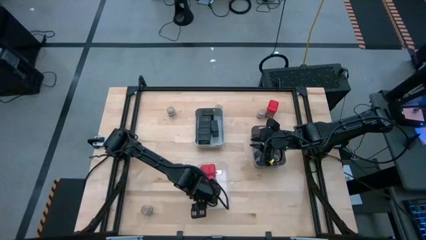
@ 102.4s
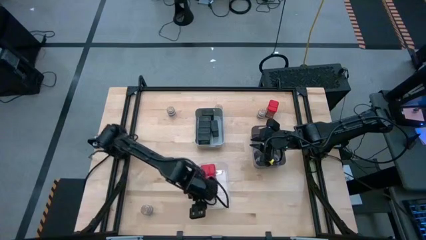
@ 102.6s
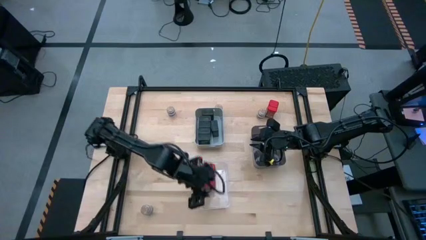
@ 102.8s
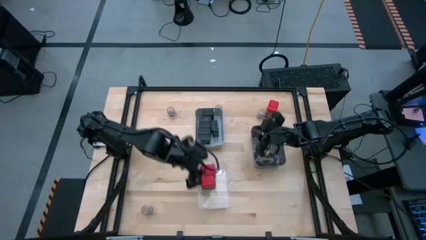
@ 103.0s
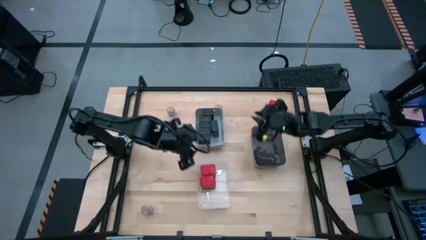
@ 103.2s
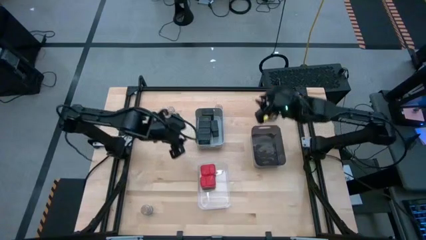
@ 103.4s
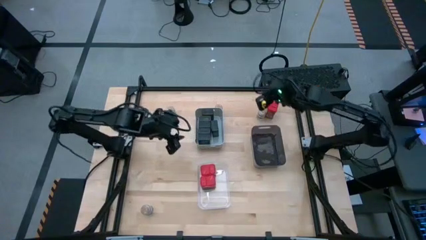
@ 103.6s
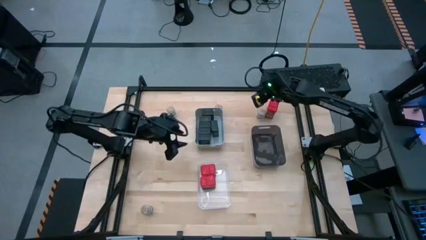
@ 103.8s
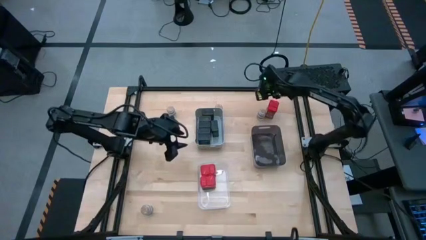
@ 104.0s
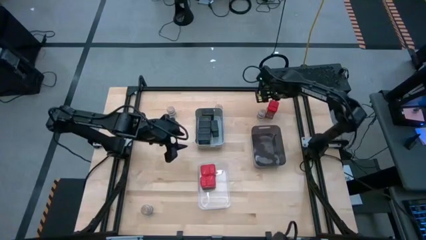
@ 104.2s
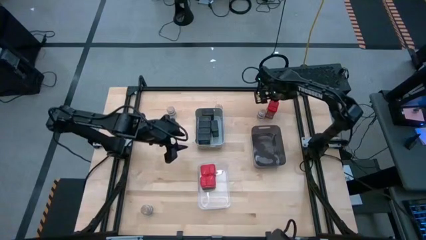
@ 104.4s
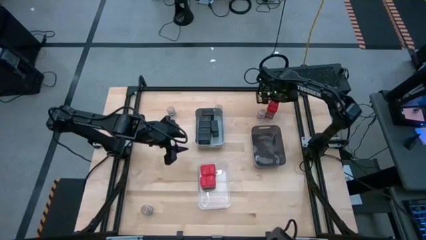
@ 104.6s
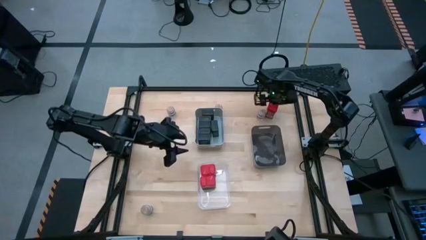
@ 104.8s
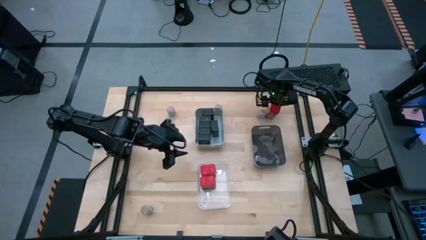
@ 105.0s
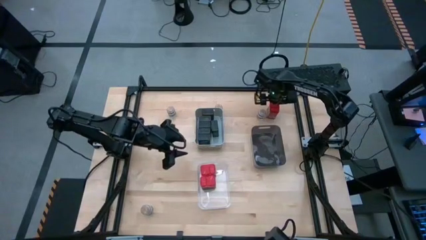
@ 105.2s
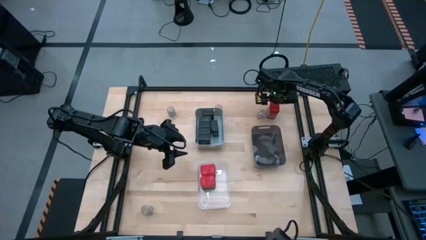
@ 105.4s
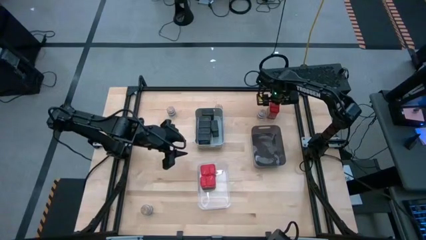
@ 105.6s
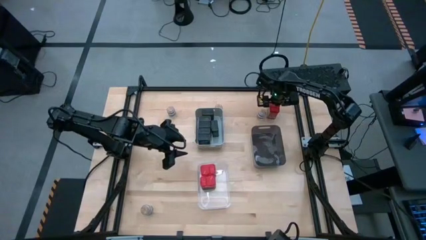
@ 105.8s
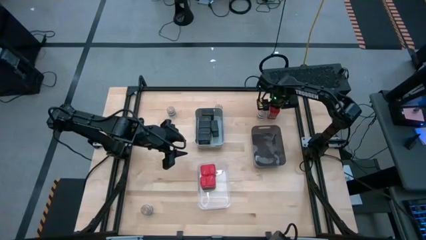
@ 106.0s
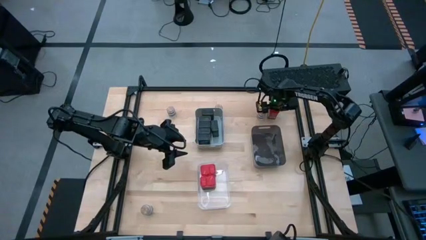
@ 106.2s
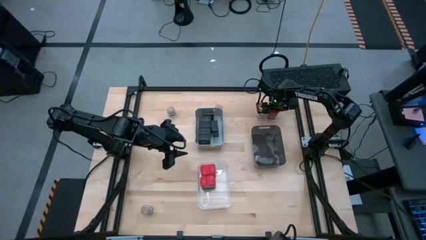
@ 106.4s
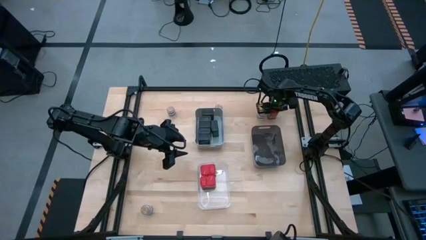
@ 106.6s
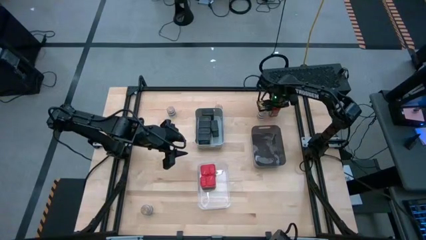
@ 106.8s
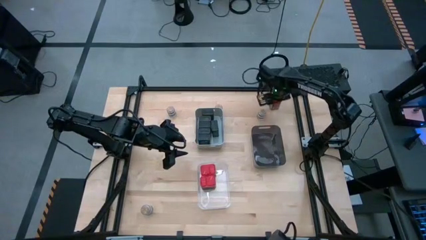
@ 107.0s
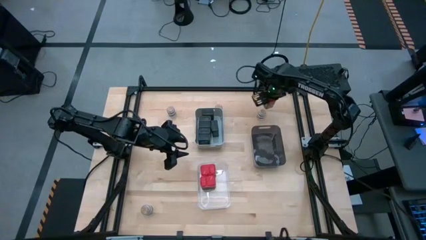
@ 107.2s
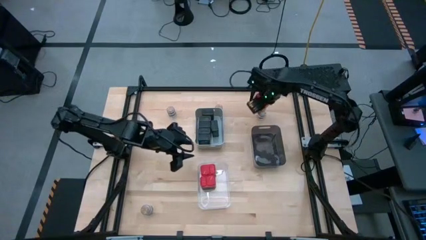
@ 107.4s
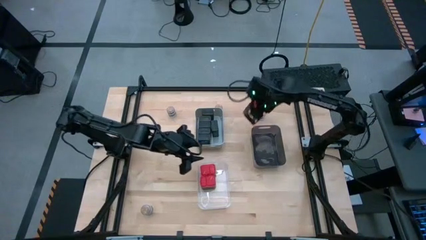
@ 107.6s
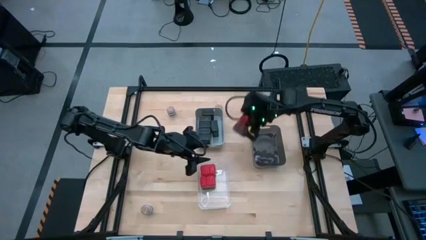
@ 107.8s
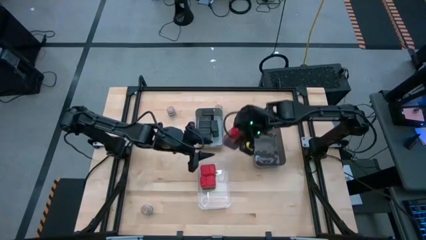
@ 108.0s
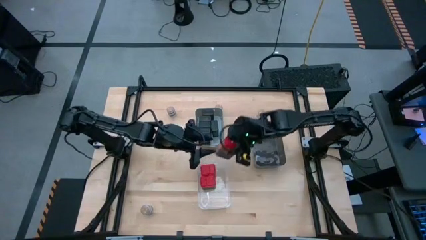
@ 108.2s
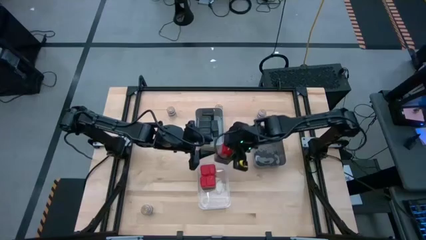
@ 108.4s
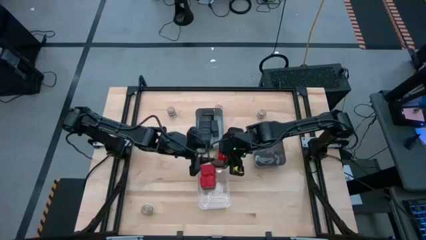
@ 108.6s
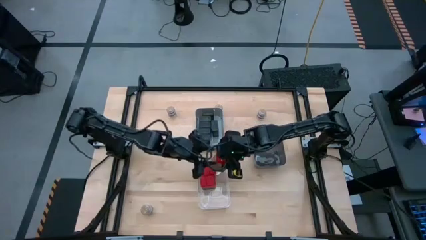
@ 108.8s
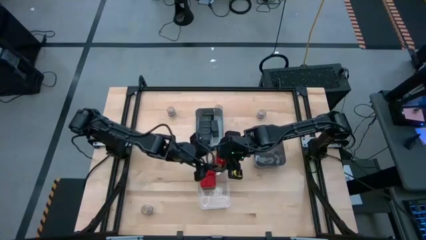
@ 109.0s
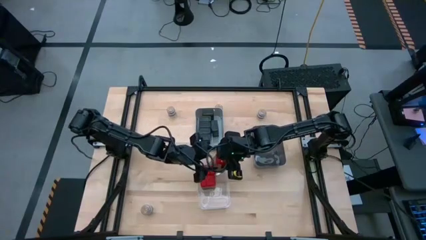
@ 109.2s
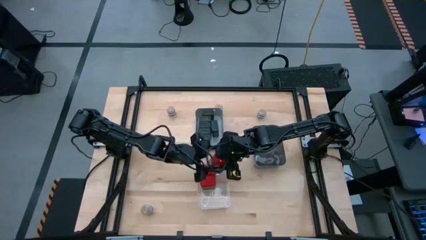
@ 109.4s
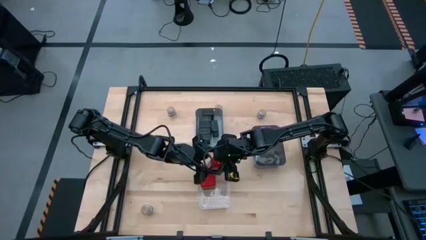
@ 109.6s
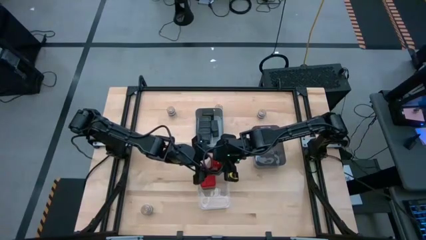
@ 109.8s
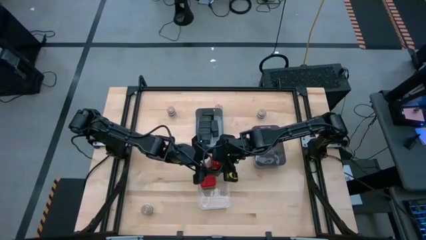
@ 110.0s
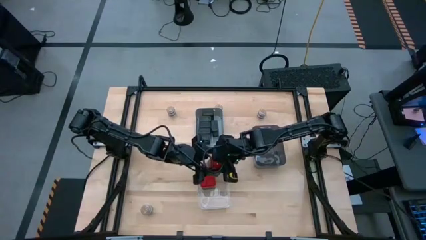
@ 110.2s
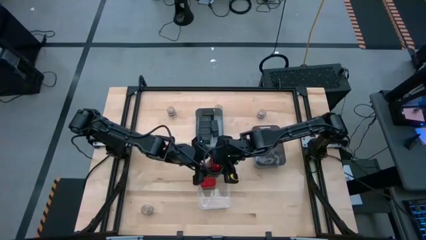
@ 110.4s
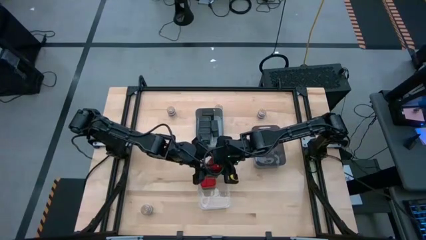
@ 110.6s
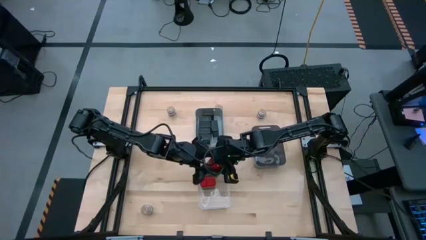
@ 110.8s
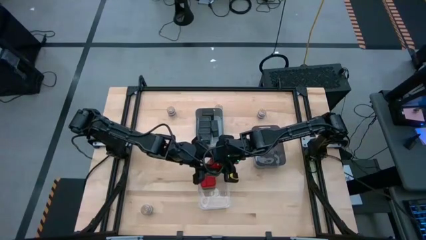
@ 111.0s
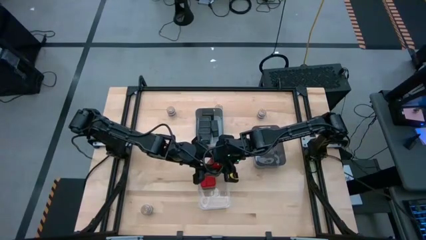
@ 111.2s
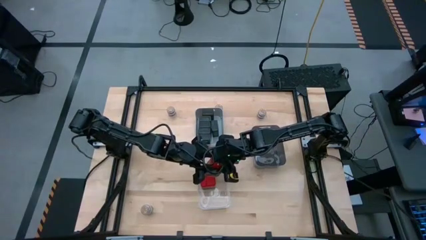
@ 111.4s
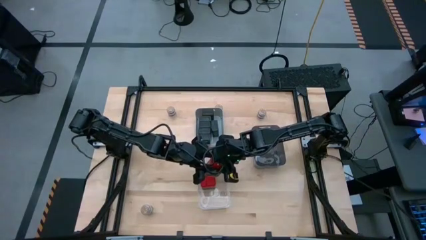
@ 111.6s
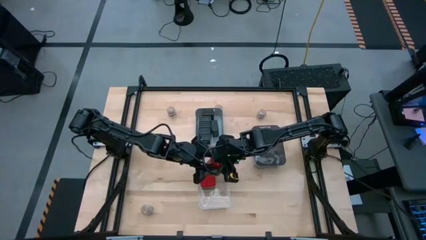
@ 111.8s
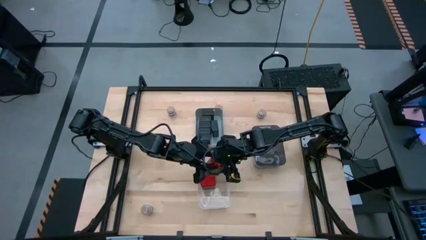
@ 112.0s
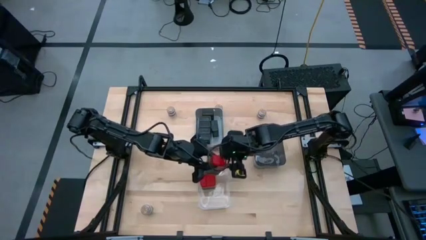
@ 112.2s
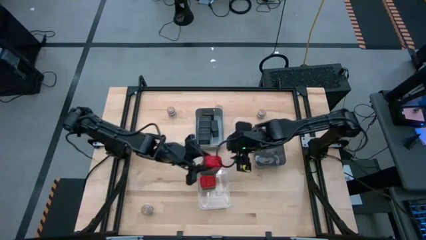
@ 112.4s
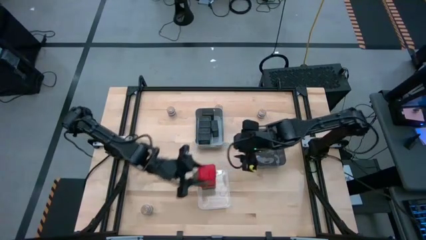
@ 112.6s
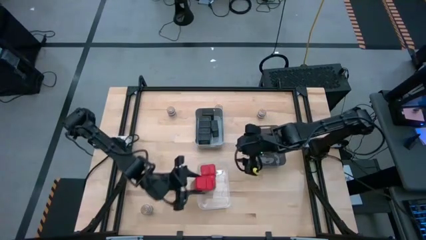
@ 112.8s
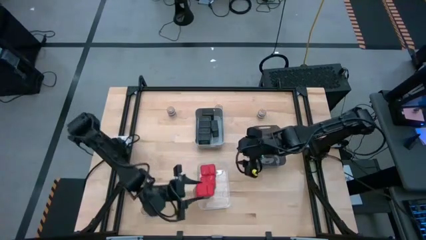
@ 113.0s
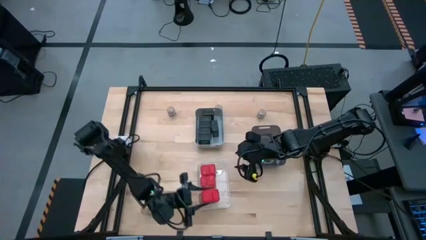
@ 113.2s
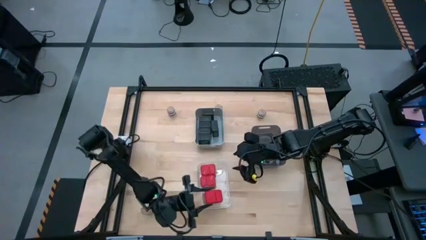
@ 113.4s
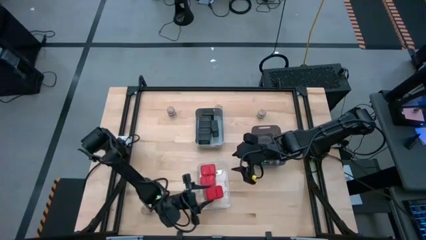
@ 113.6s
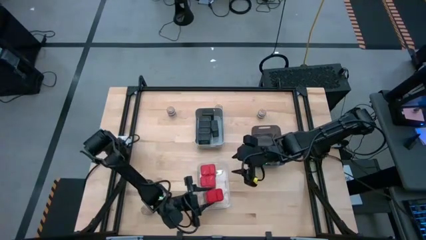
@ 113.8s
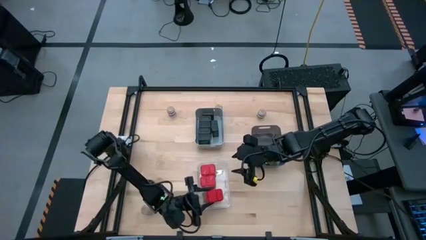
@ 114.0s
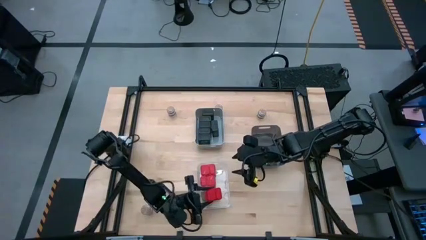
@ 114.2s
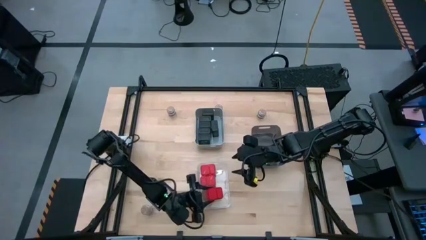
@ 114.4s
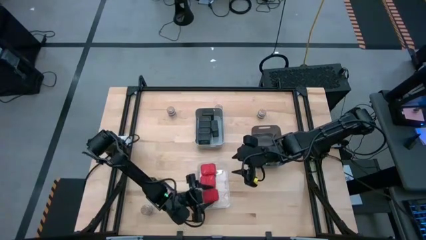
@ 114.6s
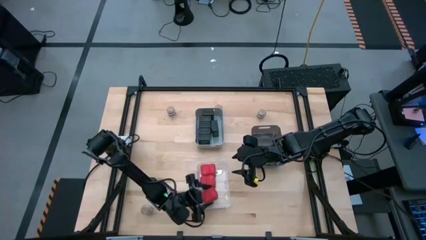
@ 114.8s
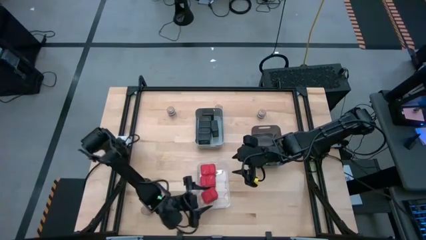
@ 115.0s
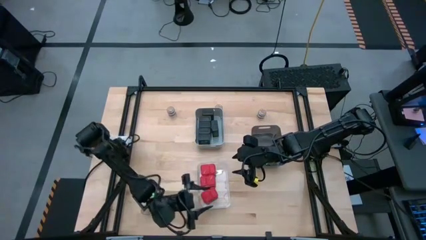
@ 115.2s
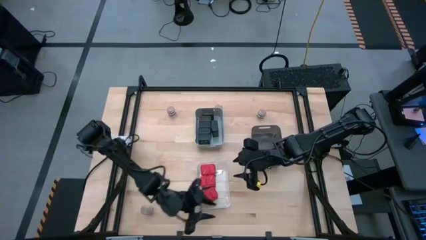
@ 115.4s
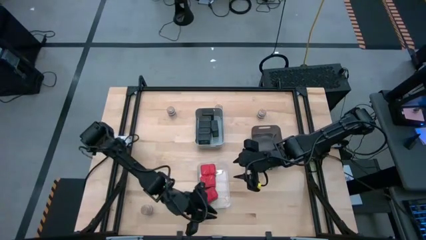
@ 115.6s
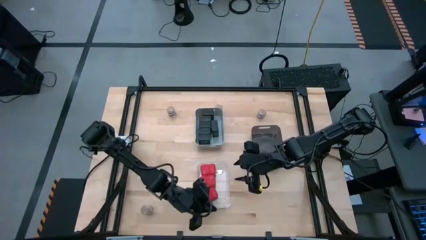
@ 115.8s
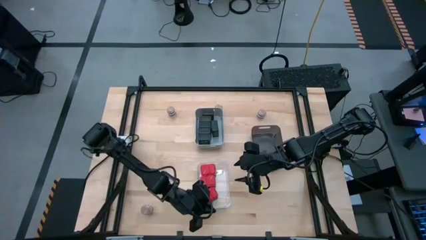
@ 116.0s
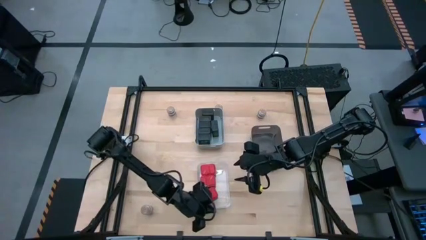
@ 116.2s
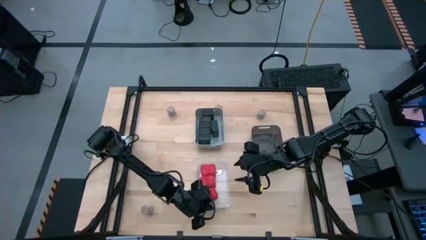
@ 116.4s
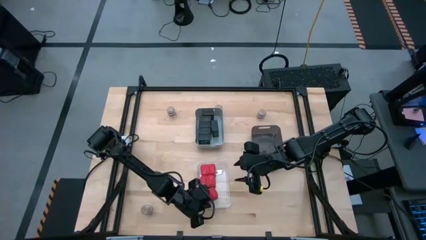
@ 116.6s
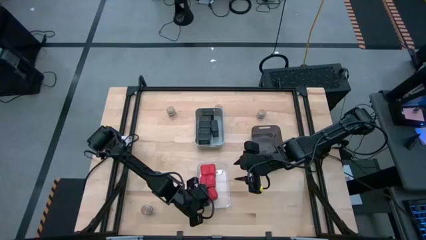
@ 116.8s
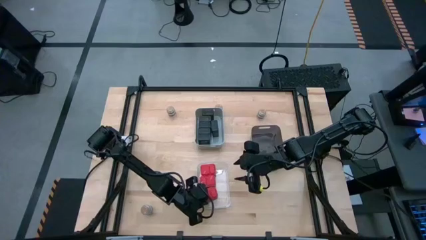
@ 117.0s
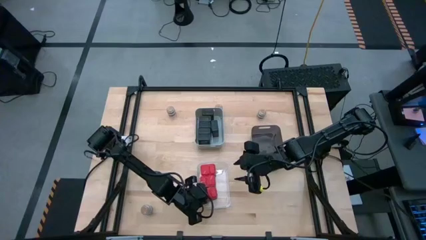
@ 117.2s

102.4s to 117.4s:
Task: Sort spices by type
Put the red spice can into the transparent bin

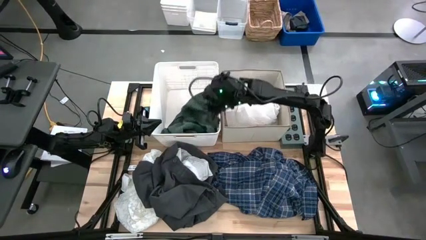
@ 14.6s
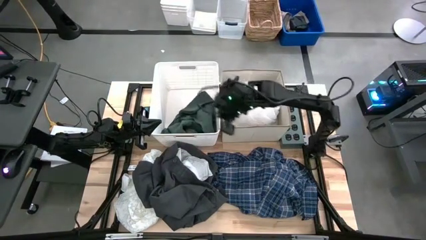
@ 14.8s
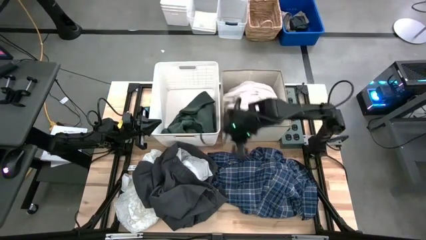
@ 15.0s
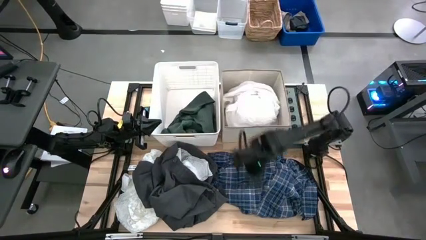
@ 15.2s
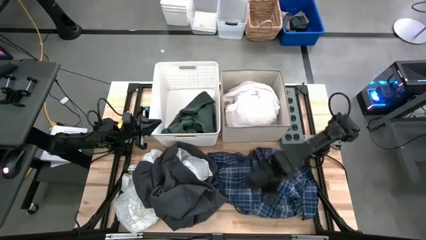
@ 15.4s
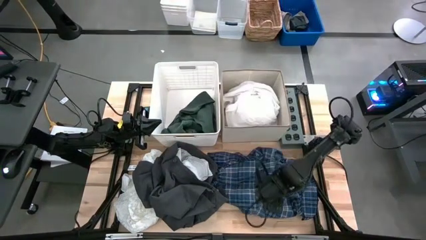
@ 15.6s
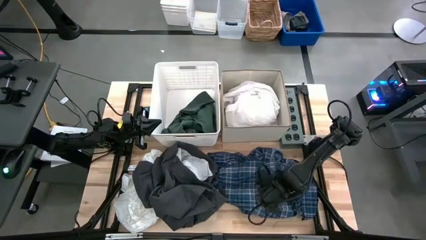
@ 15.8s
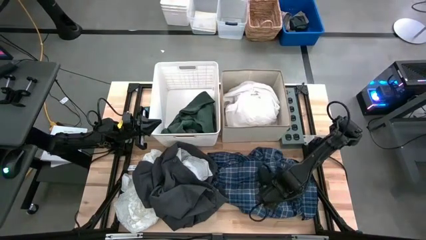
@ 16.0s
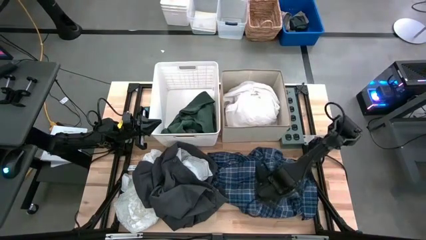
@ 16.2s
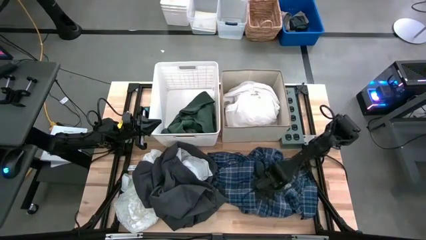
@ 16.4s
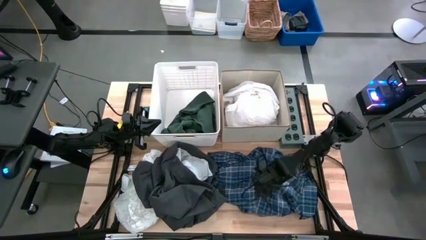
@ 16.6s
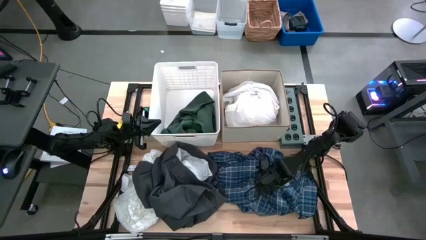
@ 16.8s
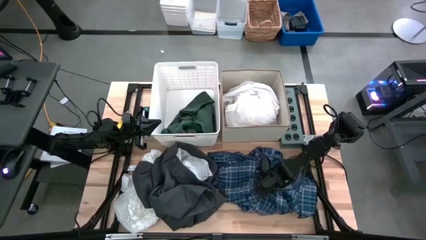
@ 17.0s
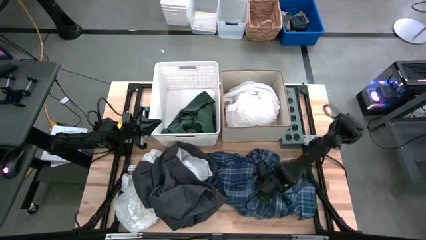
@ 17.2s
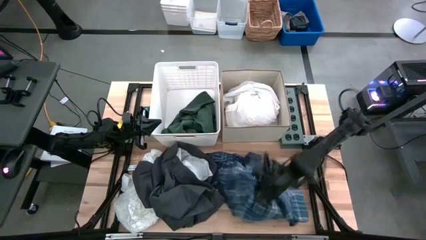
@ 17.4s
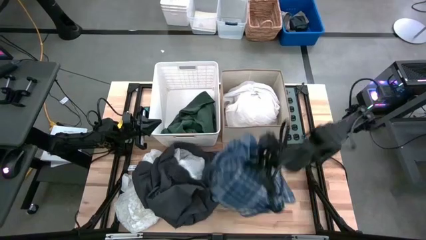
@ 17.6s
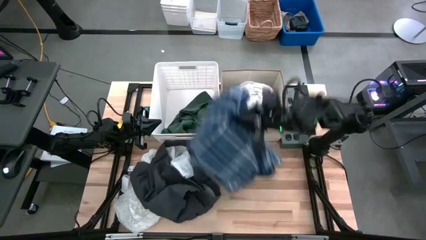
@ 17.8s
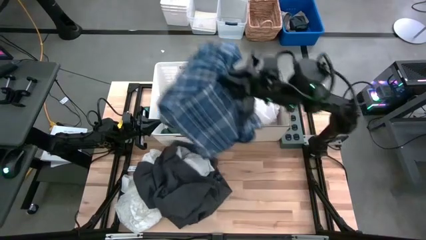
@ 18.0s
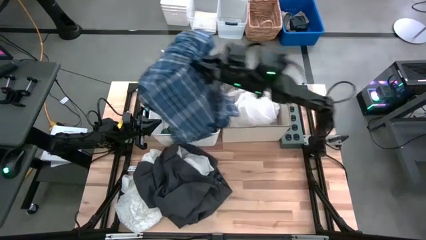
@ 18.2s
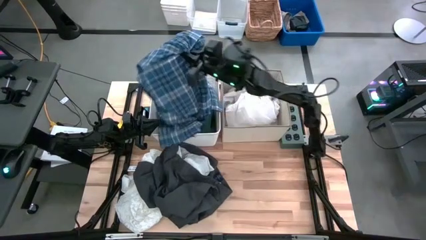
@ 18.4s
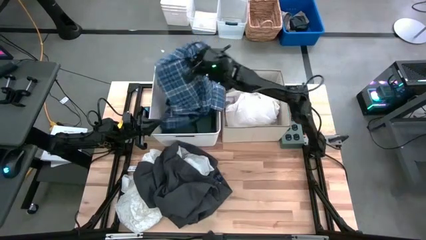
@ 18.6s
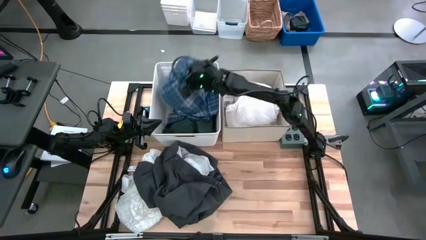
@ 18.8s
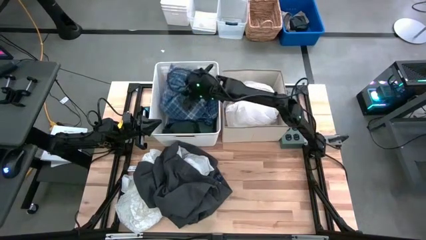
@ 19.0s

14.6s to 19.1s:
Task: Sort clothes
Put the blue shirt into the white bin
